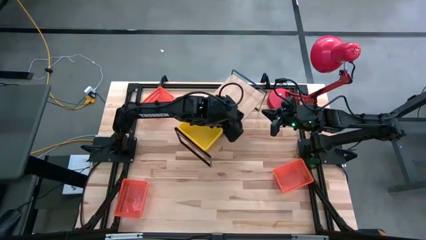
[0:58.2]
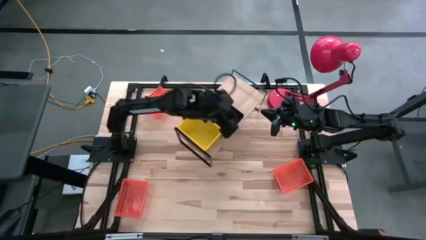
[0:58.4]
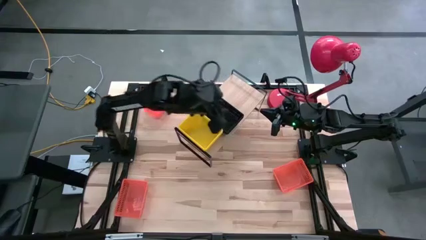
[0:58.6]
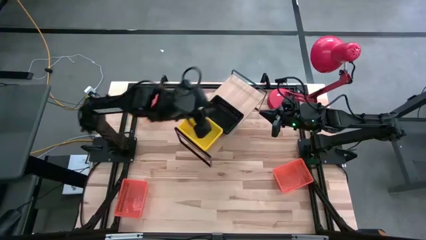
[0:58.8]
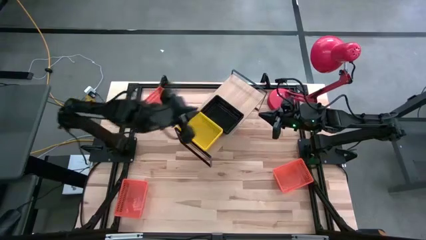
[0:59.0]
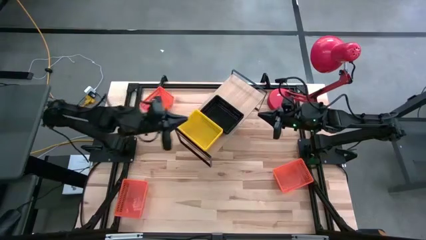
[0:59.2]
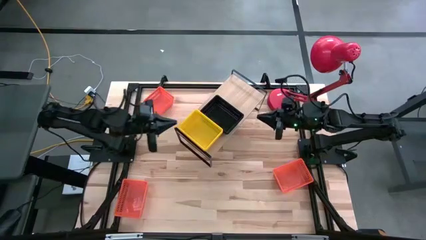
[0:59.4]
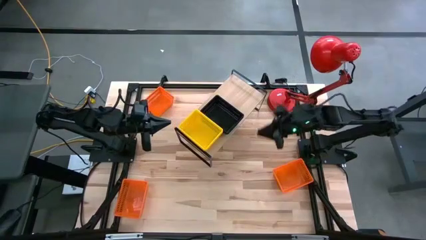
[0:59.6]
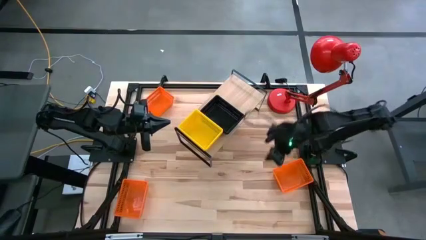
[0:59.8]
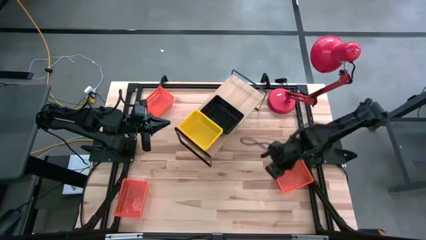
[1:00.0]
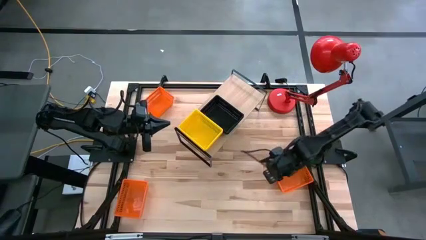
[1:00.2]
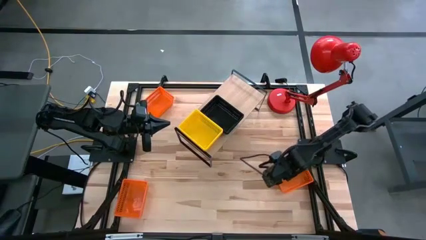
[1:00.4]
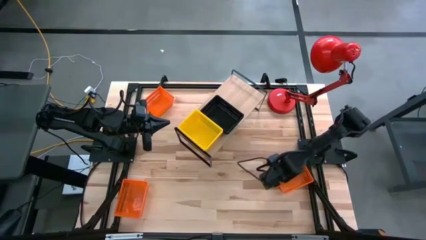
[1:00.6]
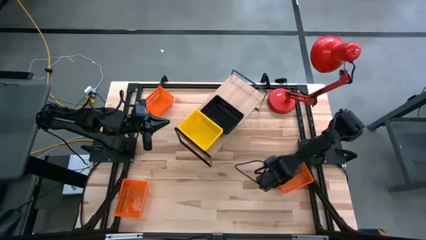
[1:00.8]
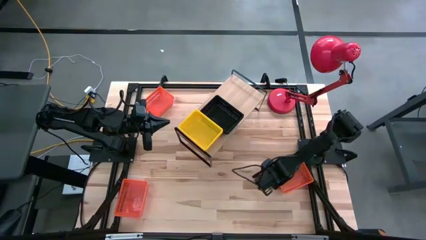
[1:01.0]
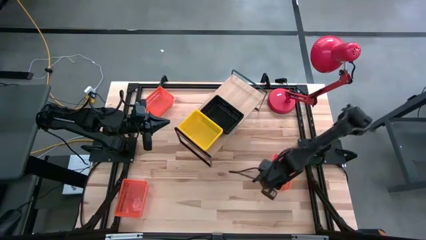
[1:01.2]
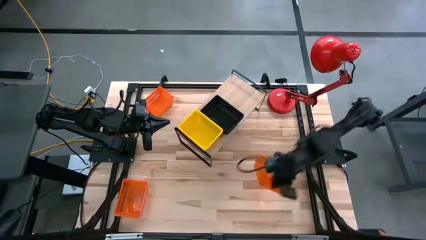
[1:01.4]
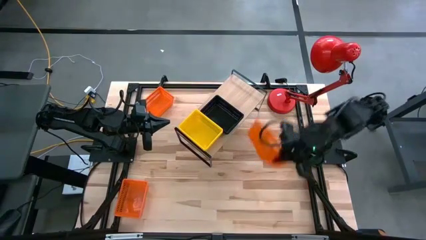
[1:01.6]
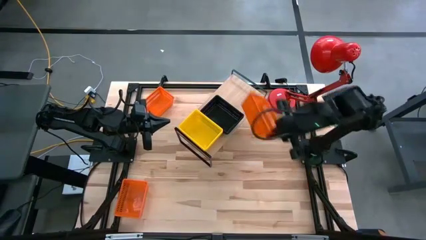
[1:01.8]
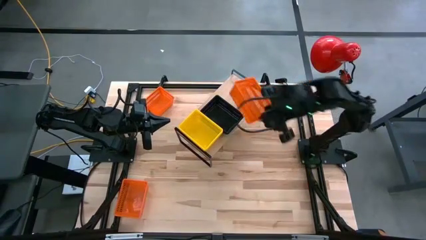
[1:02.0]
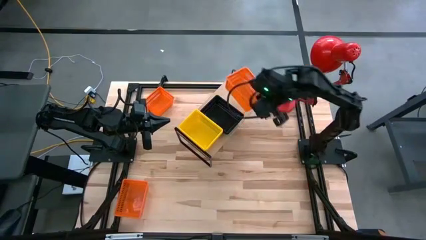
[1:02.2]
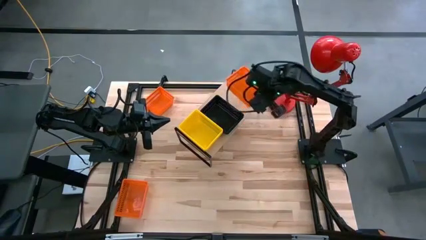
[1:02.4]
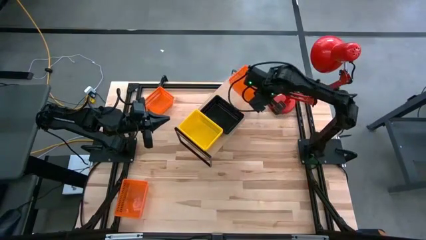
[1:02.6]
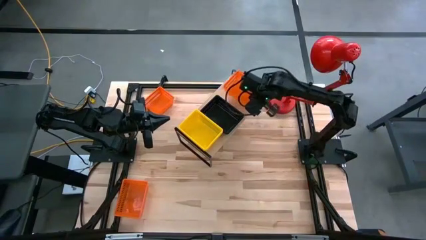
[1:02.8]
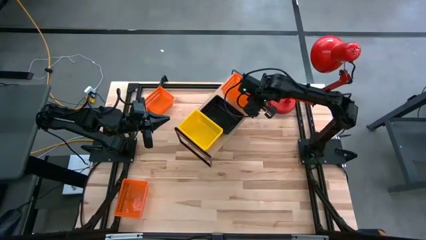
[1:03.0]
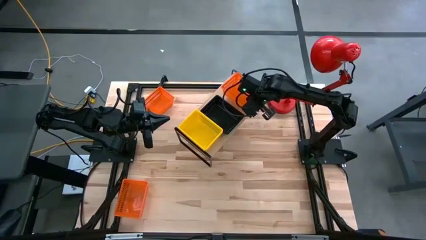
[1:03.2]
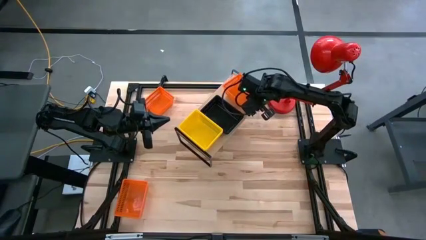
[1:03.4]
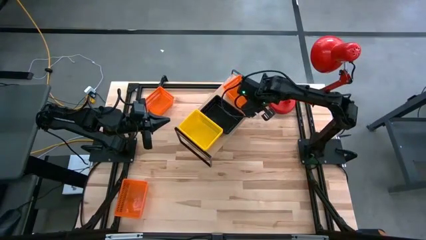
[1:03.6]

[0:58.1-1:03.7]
Task: Stack baskets on shelf by color
Put the bottom right orange bin on the shelf

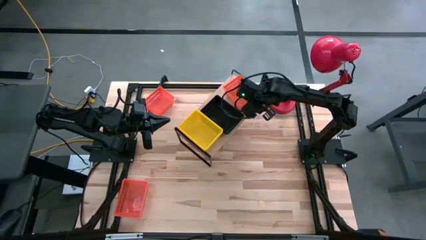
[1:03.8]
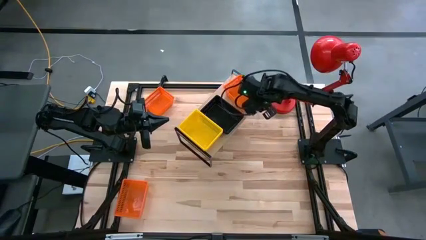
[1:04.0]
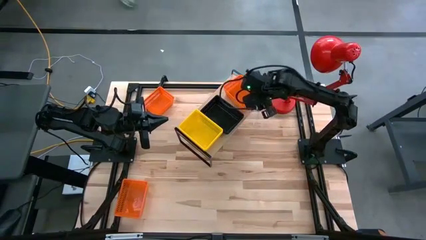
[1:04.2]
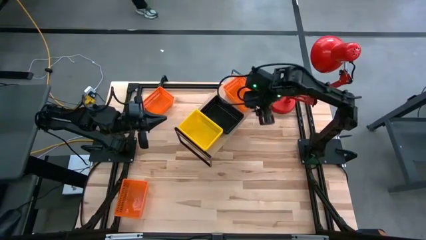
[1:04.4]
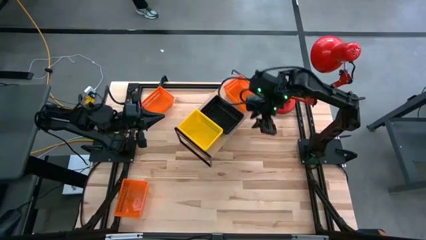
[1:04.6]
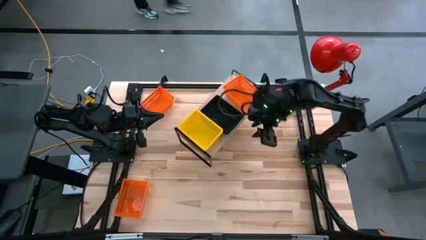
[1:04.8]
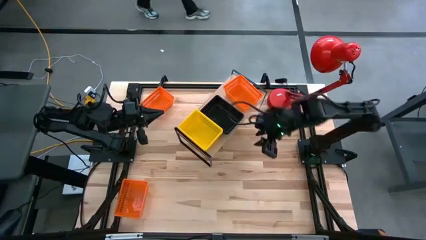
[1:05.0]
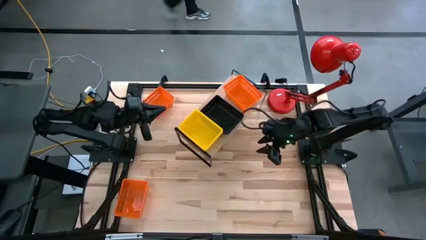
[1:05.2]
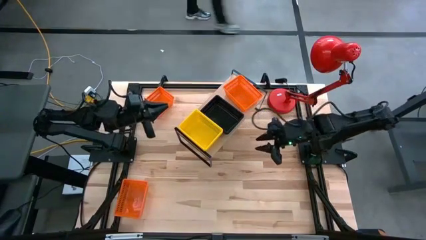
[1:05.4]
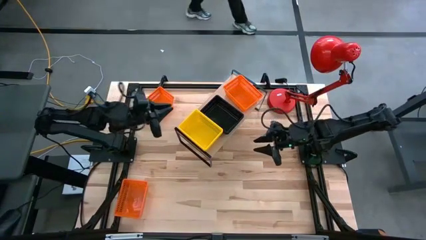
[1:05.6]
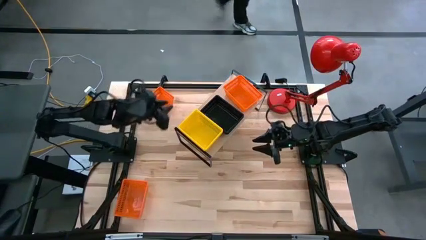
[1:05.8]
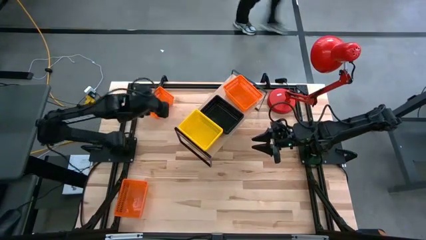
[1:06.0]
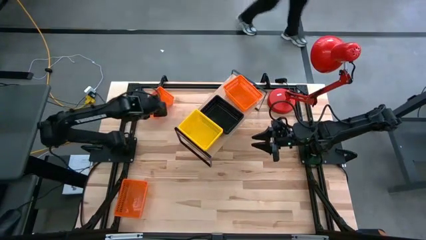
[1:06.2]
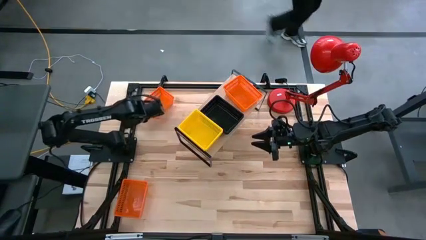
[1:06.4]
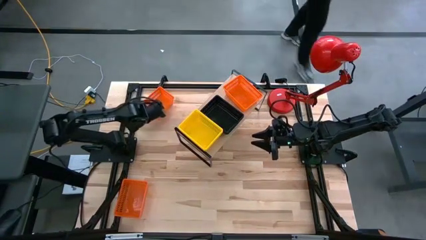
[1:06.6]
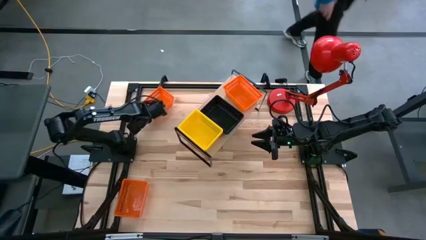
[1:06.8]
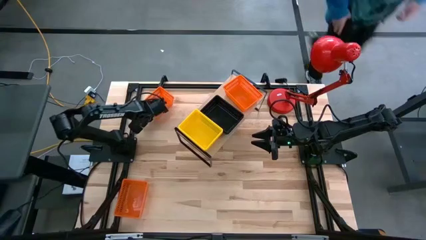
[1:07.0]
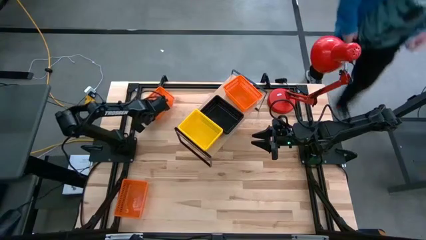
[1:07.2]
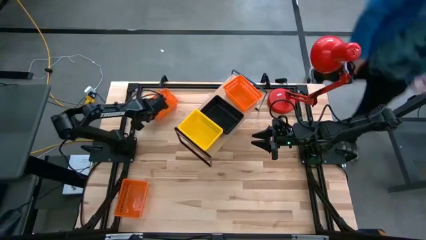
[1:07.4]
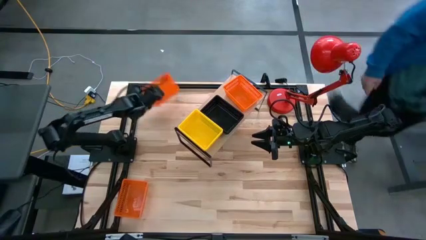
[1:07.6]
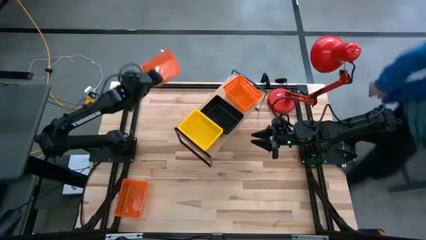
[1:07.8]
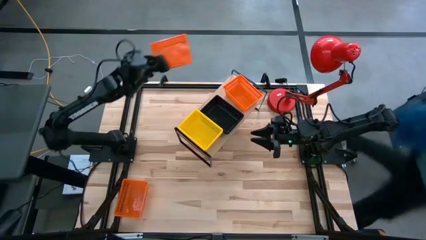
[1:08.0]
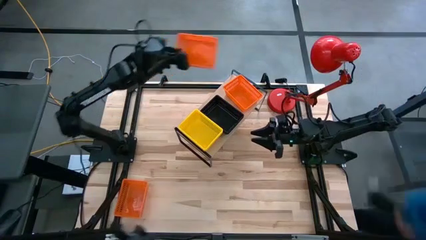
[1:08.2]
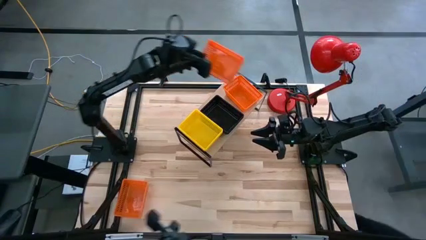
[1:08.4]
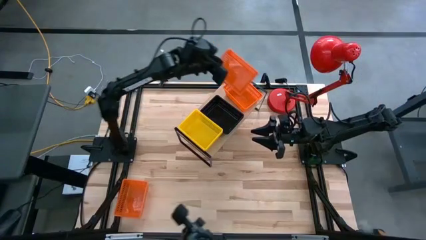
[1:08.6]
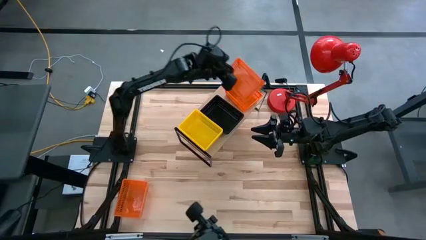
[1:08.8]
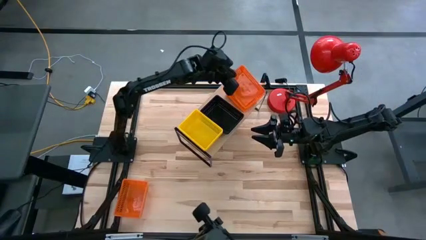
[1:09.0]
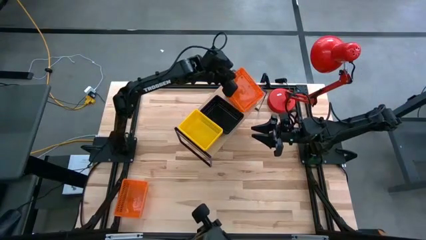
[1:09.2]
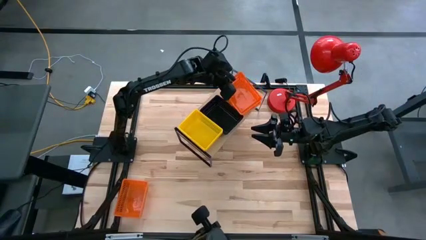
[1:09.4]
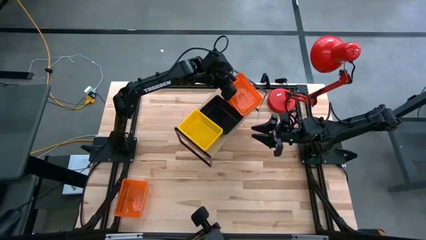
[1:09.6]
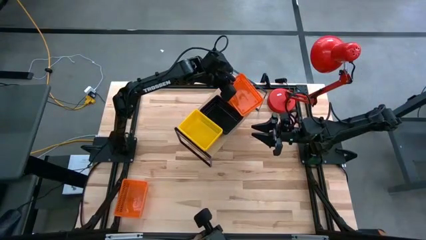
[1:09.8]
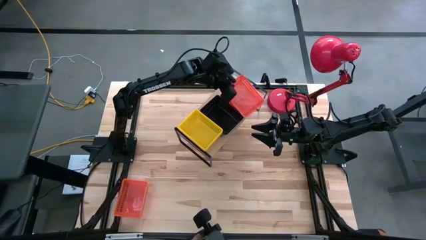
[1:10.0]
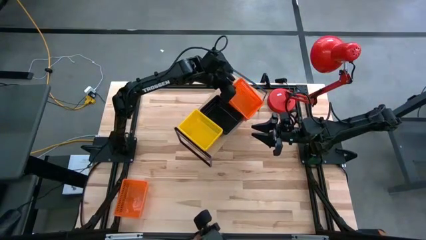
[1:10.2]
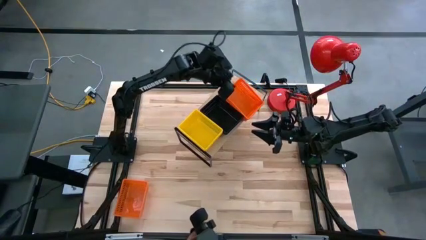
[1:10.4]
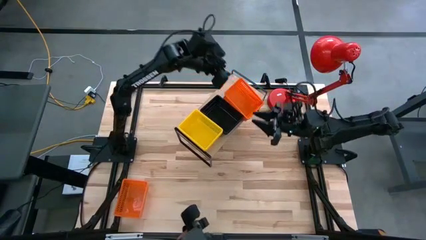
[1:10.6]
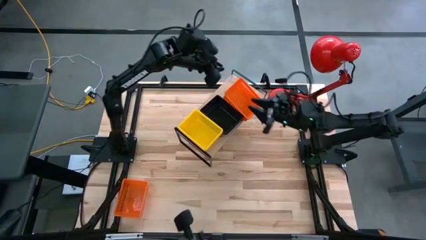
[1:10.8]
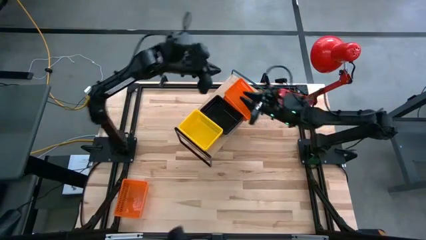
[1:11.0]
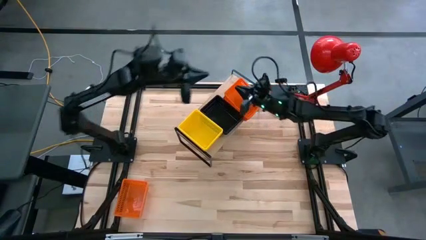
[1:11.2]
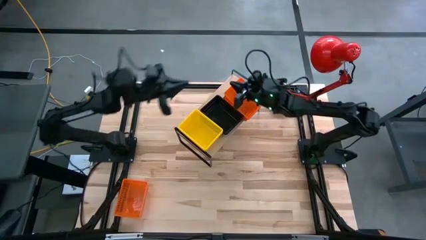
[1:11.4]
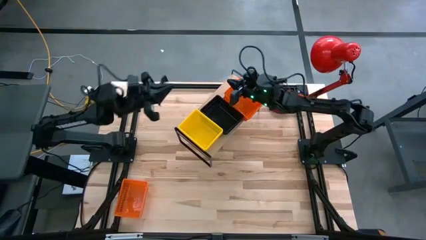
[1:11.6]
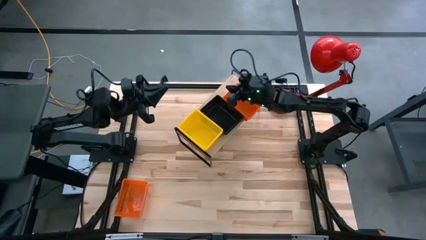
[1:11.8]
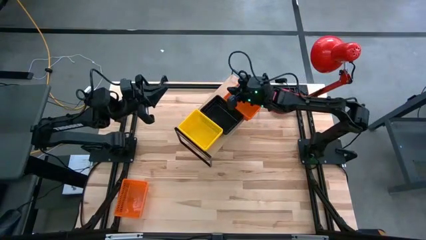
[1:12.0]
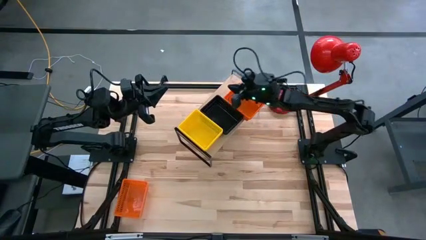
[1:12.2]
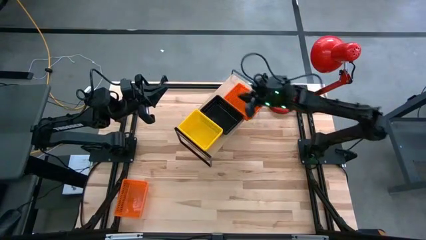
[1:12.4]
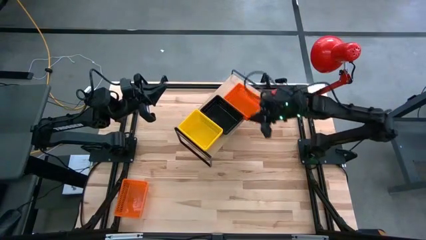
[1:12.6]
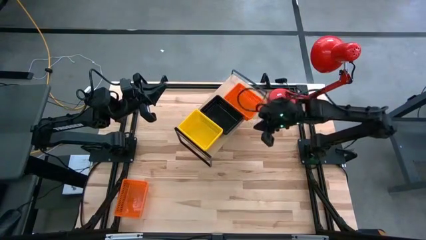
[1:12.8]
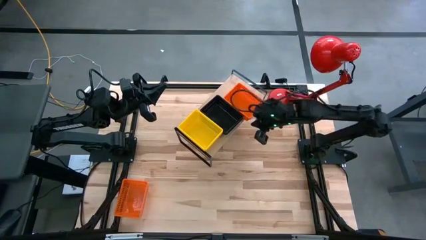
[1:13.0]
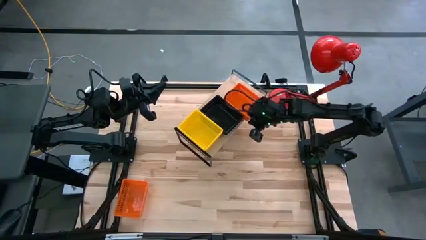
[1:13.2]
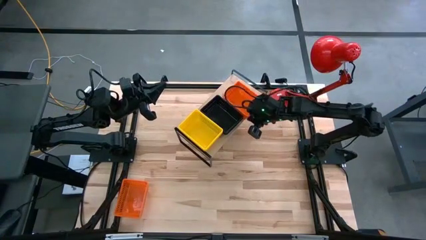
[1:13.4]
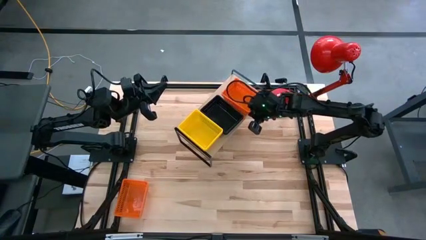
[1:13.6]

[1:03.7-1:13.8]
Stack the top orange bin on top of the orange bin on the shelf

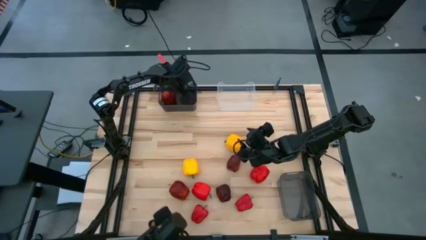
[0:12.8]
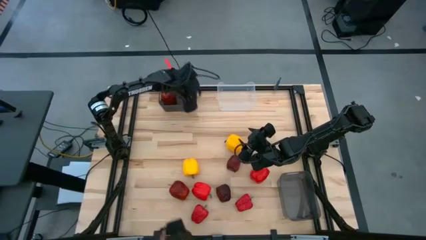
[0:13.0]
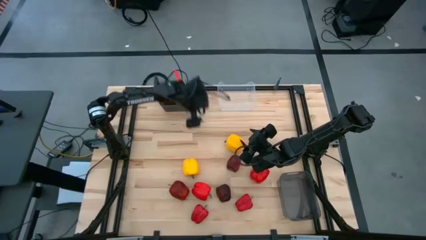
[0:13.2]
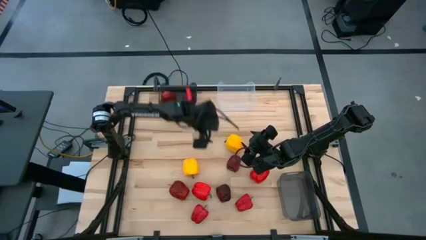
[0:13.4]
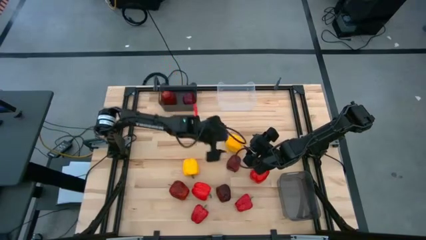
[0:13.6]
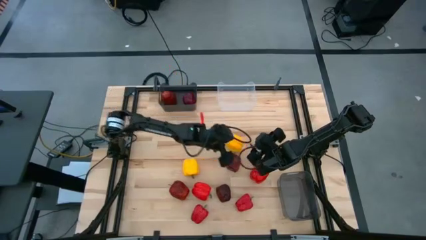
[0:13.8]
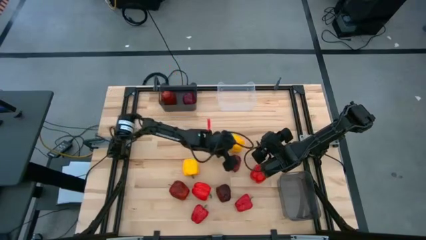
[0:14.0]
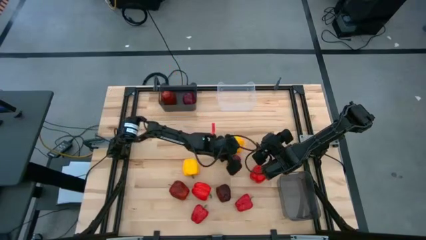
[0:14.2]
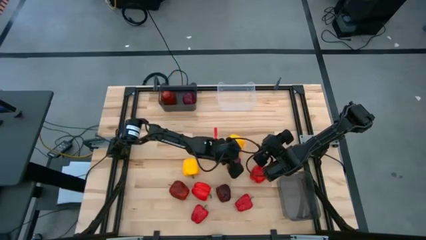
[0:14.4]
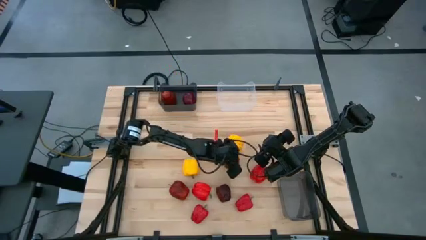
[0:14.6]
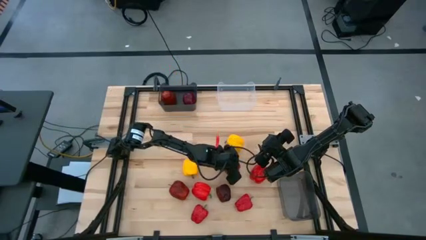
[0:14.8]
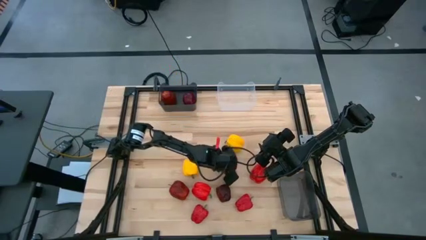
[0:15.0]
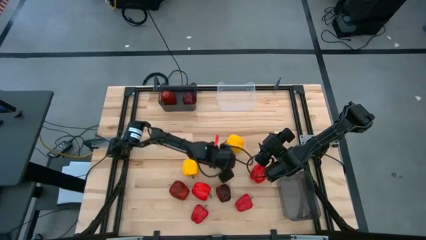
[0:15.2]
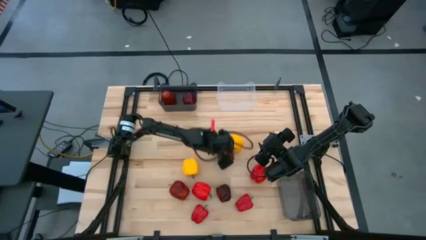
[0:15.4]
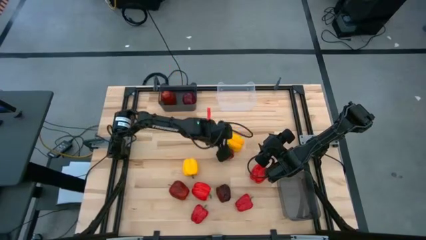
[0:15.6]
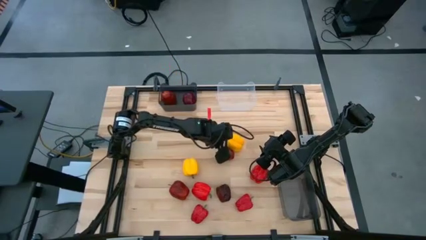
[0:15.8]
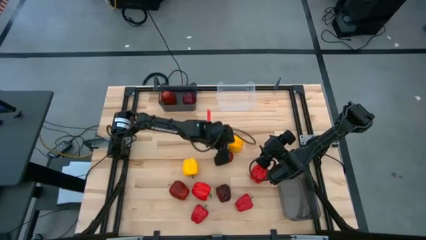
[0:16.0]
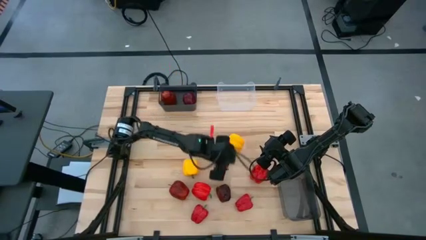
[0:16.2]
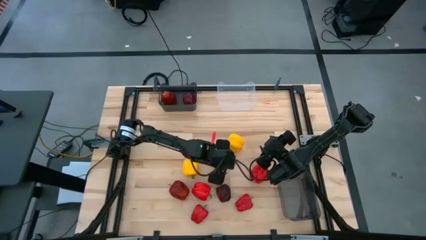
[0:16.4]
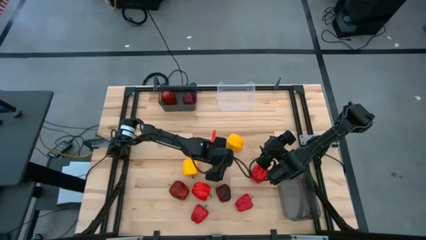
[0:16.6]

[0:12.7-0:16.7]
Task: Sort produce into baskets
Put the red apple into the top black bin
